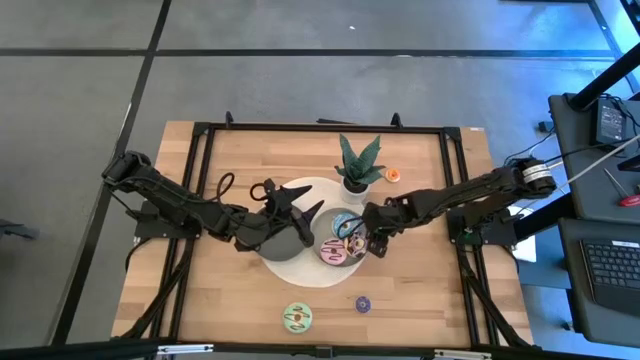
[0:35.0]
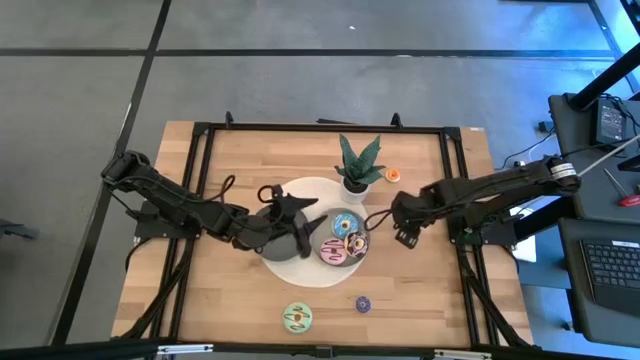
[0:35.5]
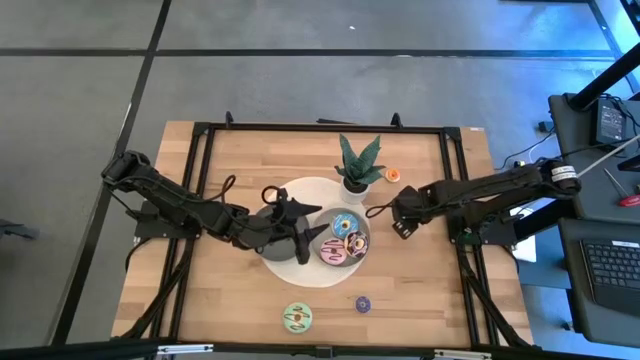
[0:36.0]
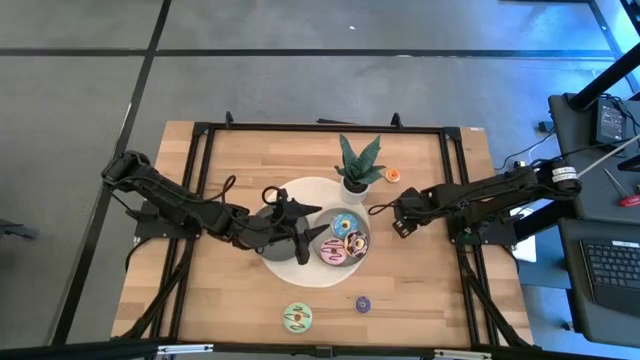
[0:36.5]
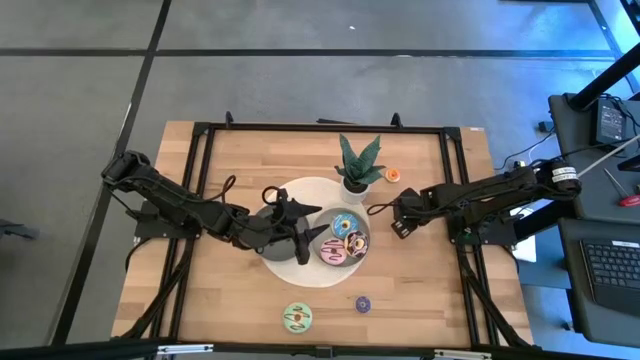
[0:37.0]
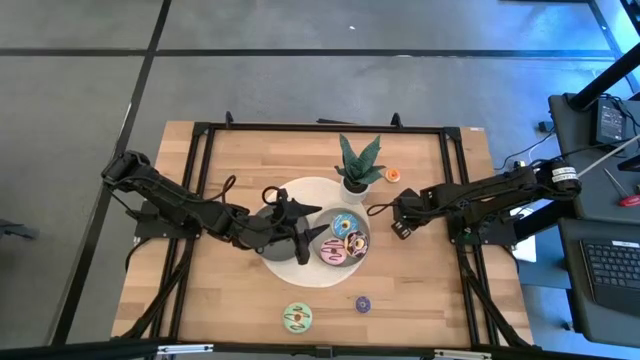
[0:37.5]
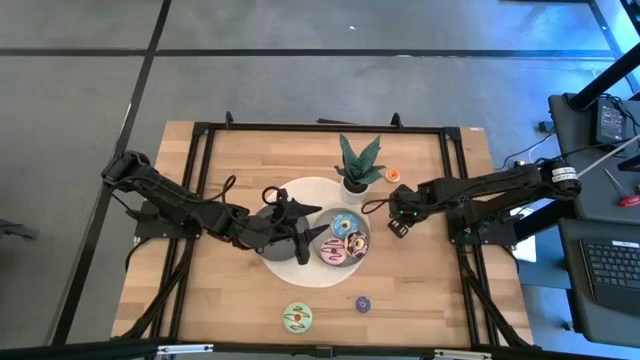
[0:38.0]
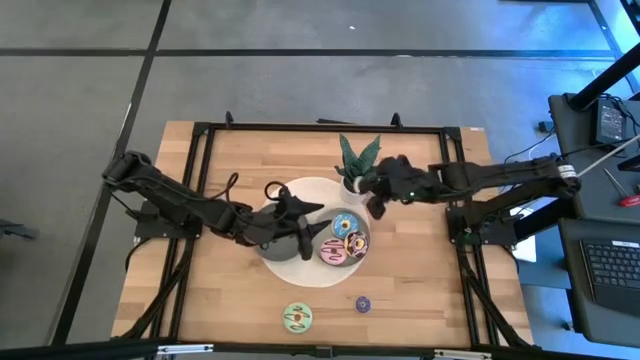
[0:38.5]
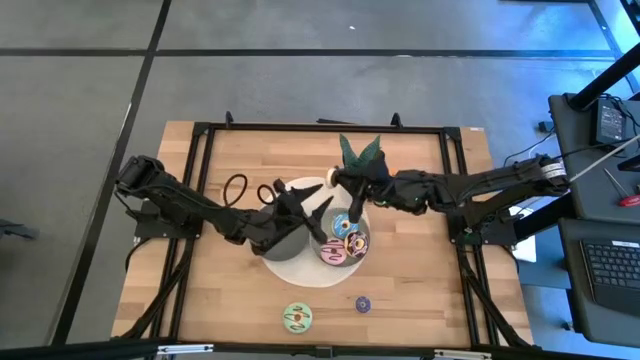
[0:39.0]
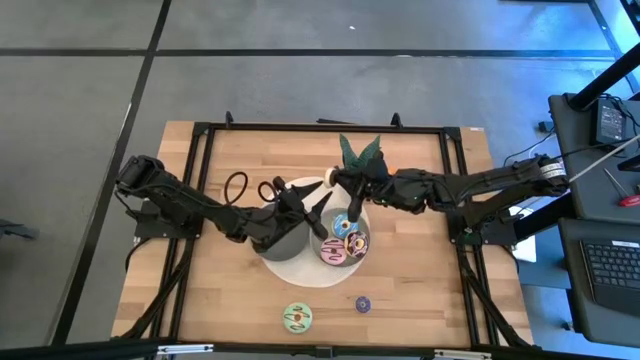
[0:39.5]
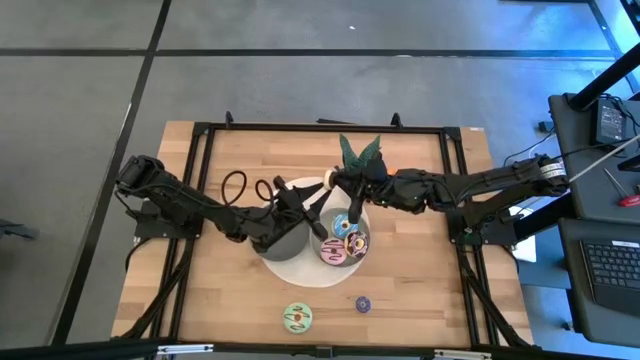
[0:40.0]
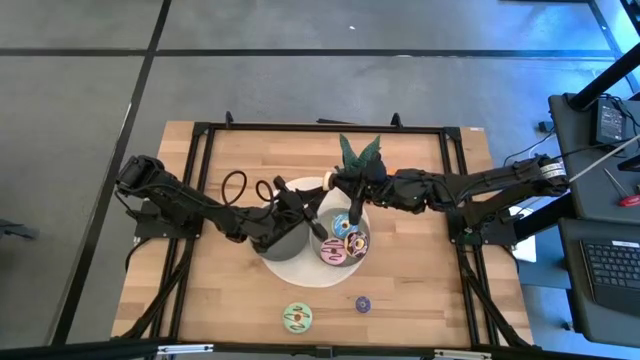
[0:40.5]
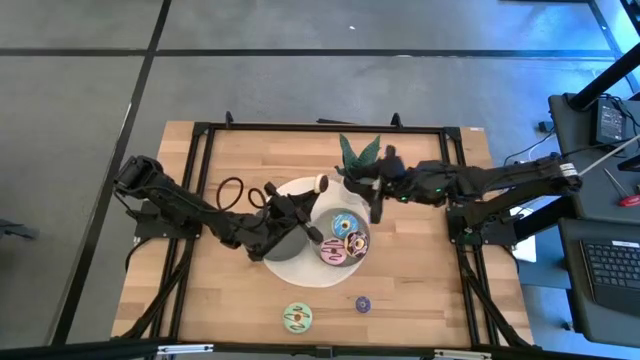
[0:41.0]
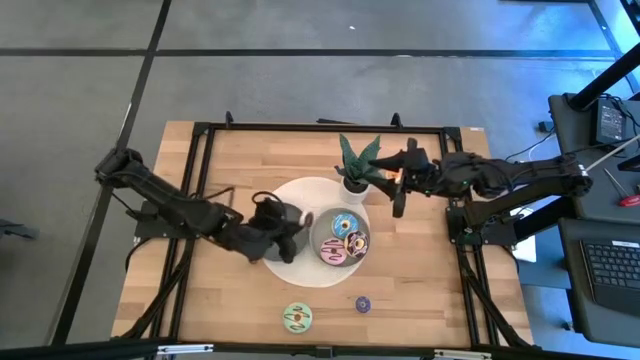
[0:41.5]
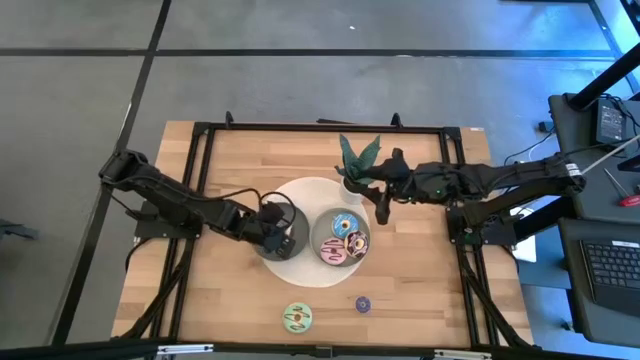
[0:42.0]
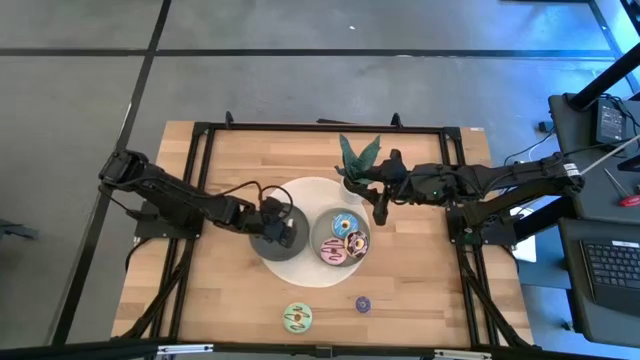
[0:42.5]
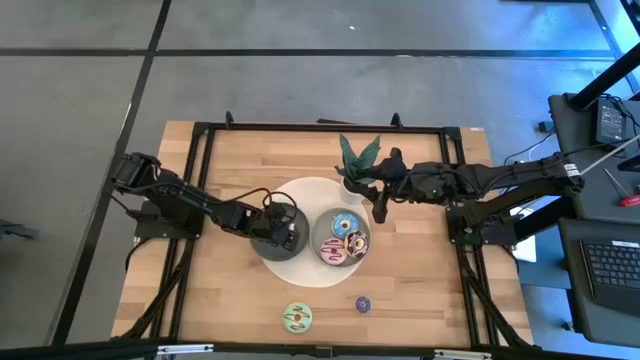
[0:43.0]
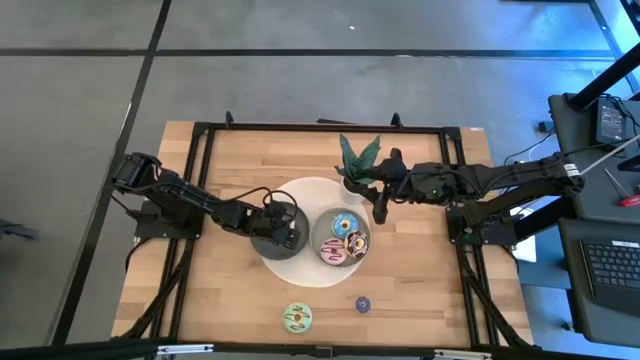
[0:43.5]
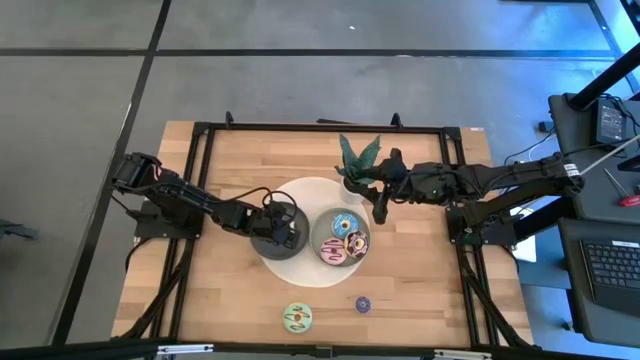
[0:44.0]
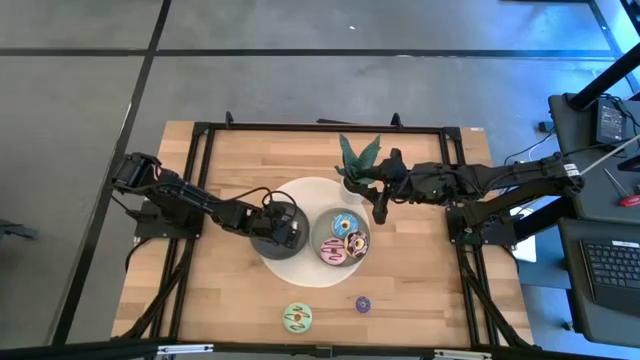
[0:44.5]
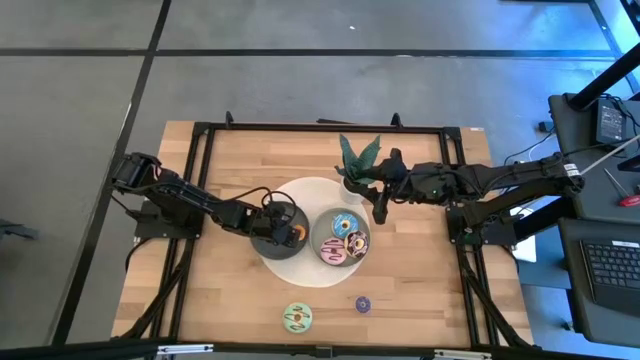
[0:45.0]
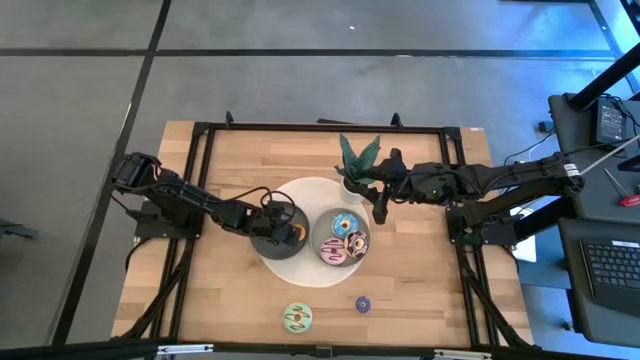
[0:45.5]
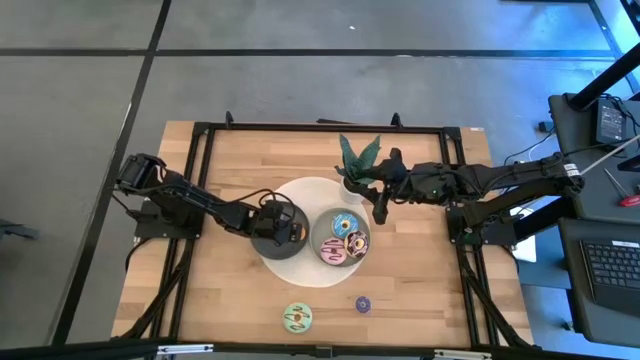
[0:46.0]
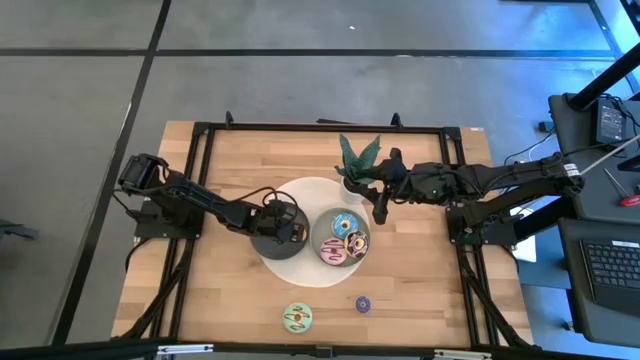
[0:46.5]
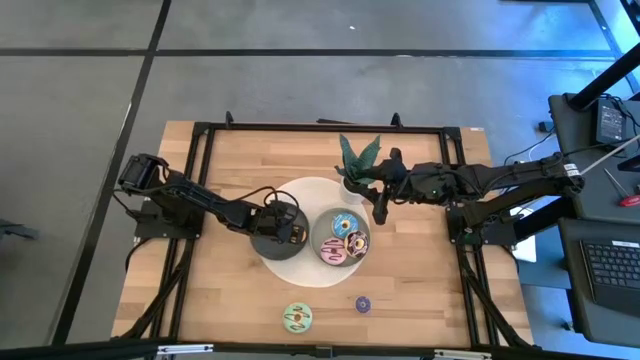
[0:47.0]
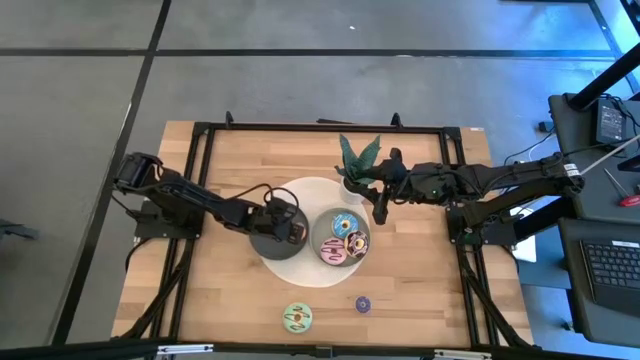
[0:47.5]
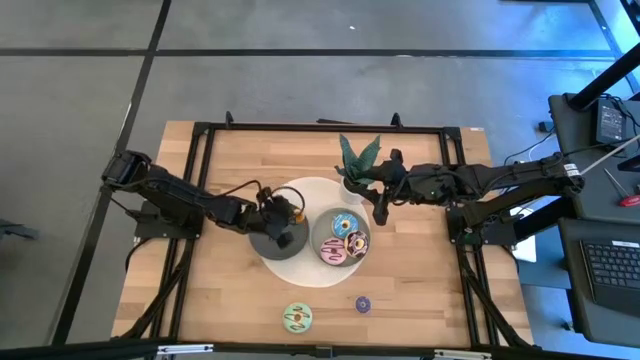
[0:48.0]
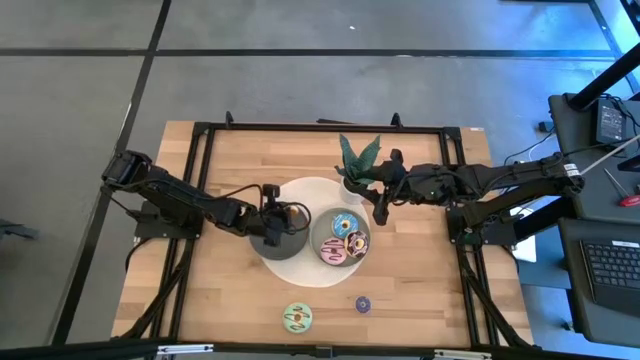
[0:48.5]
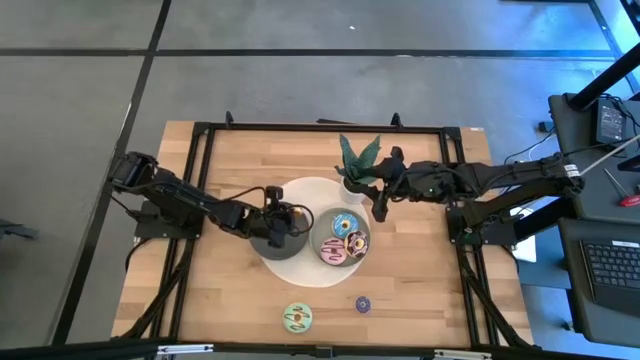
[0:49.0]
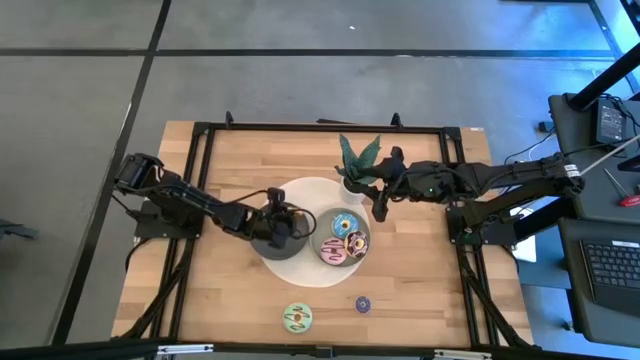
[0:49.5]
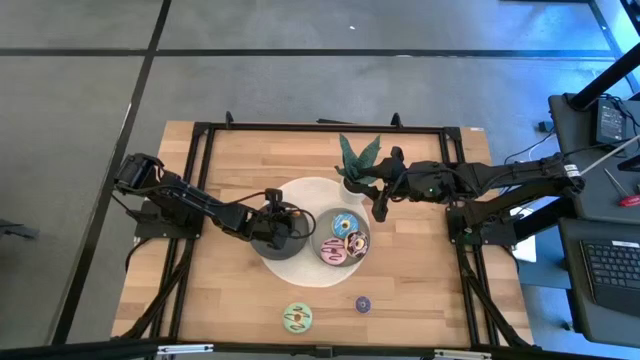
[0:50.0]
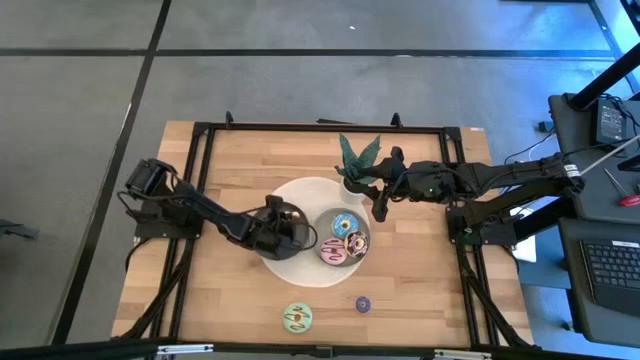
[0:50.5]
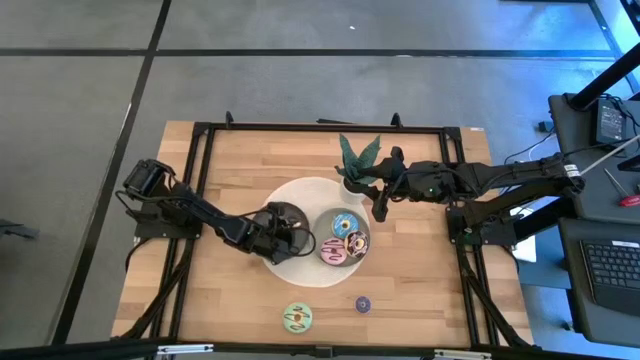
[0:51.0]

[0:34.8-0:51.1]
Task: Pick & Place donuts
Put the small black doughnut on the dark gray plate

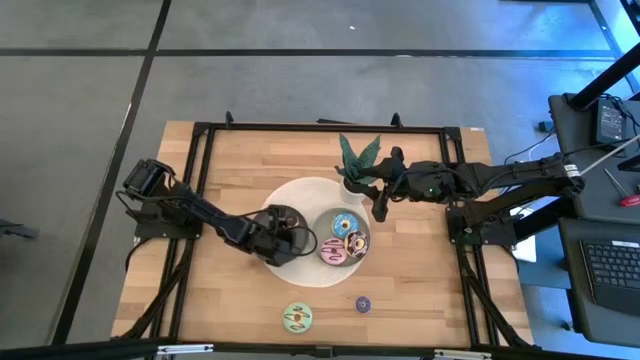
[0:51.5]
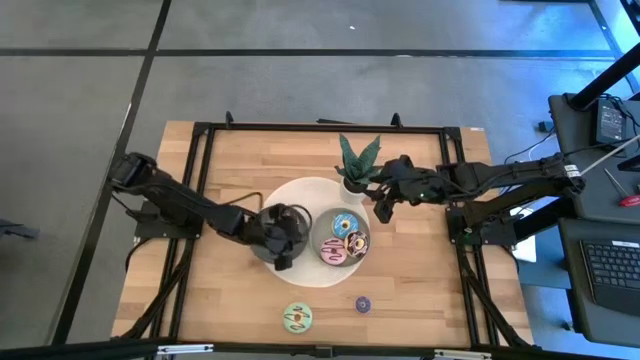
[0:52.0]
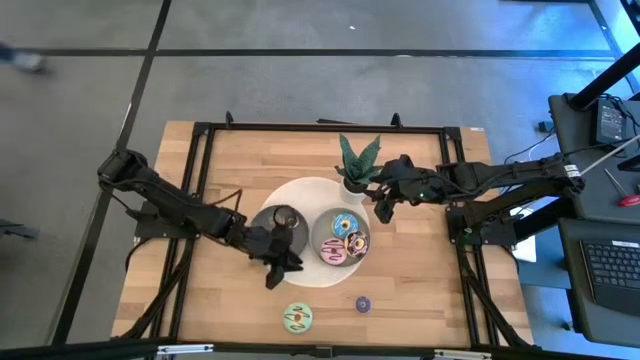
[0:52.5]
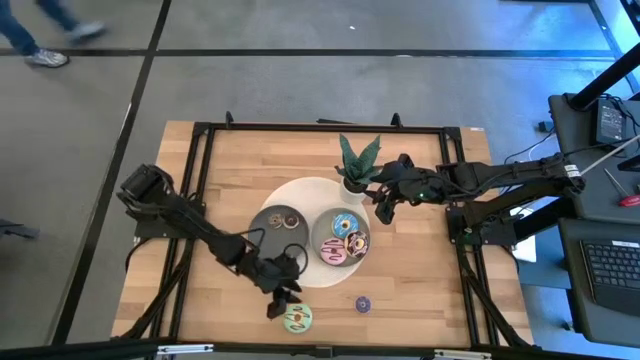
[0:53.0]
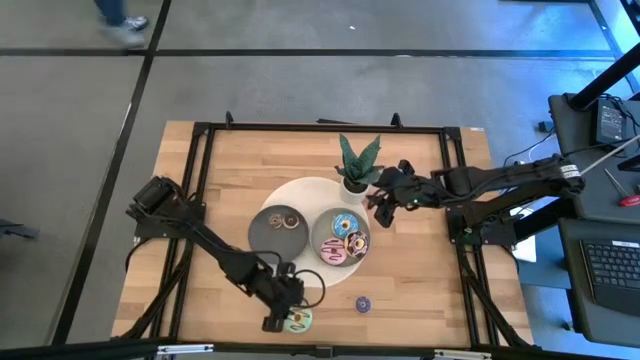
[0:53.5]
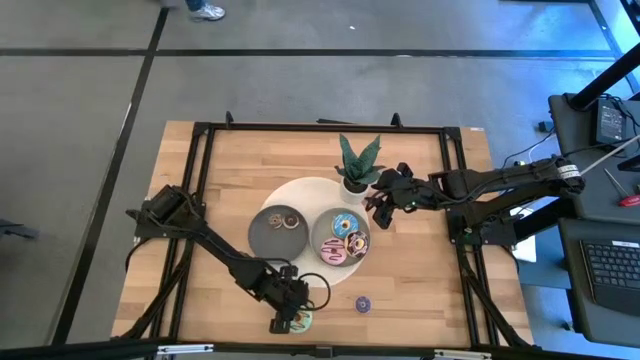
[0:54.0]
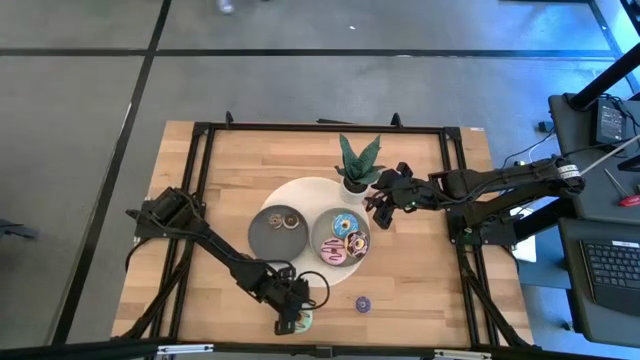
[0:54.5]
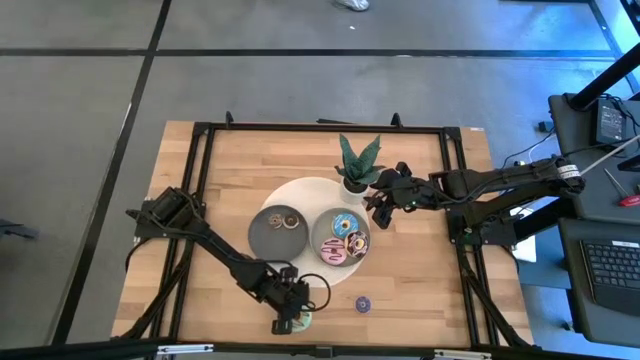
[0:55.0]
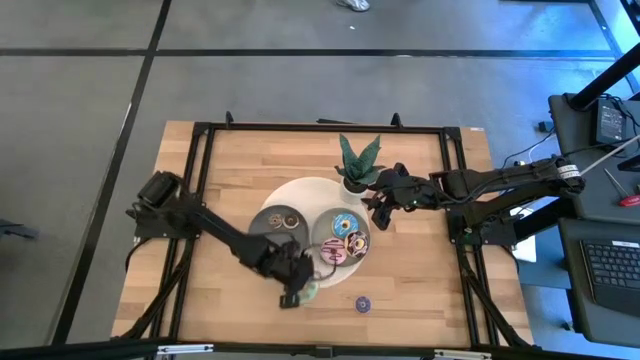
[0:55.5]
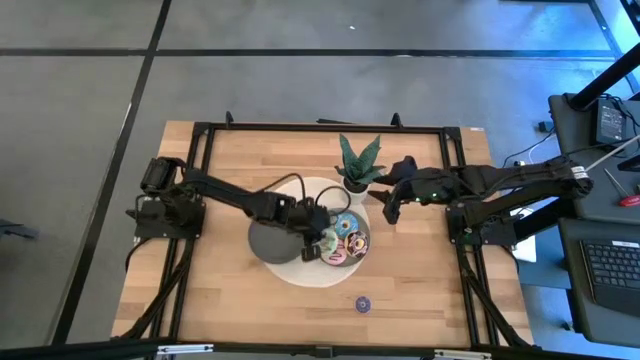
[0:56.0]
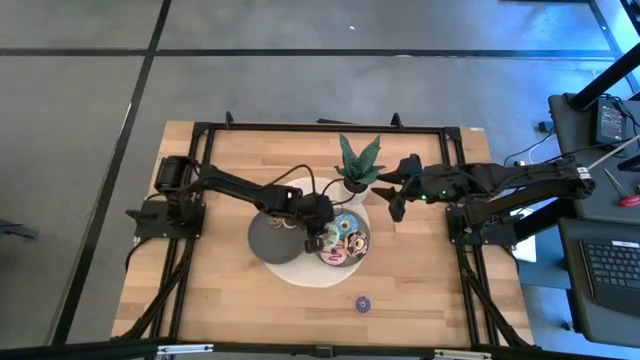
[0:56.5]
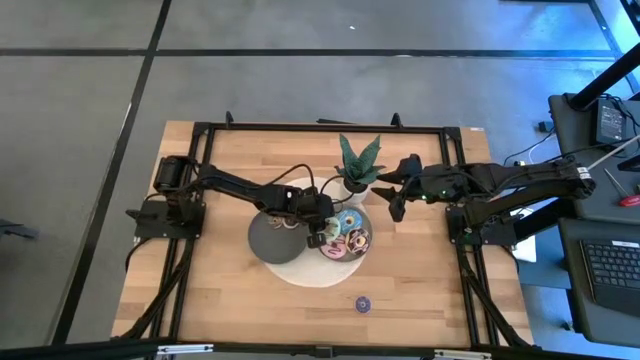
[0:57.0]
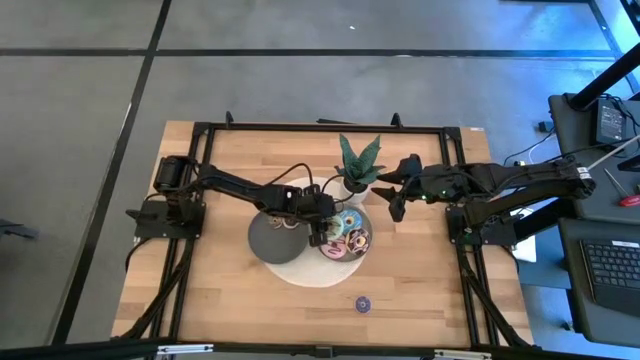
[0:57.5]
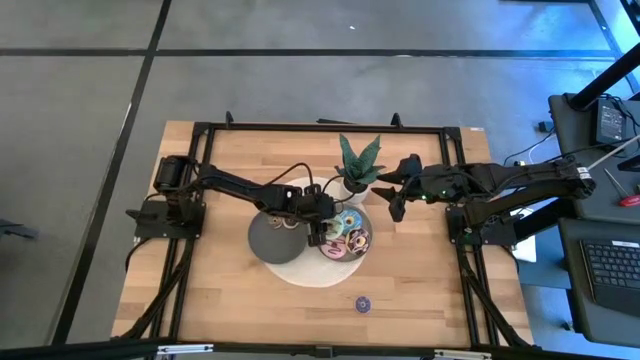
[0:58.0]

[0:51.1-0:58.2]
Put the big light green doughnut on the light gray plate
